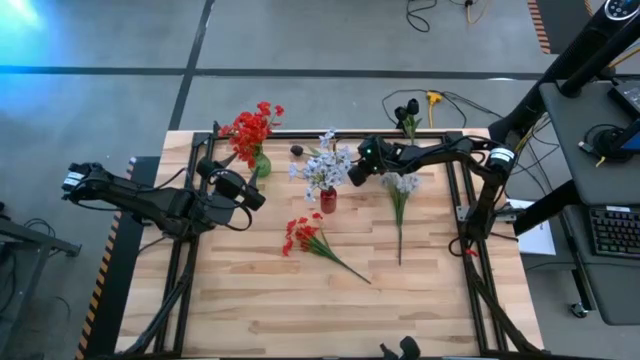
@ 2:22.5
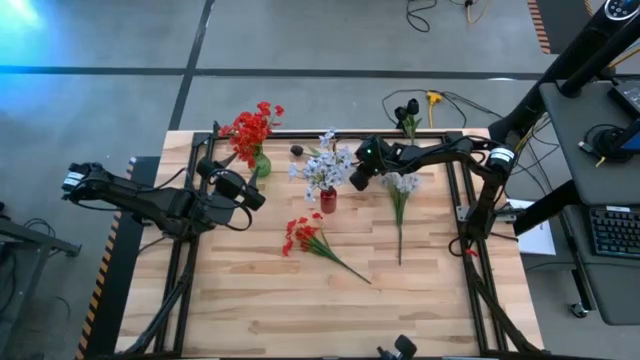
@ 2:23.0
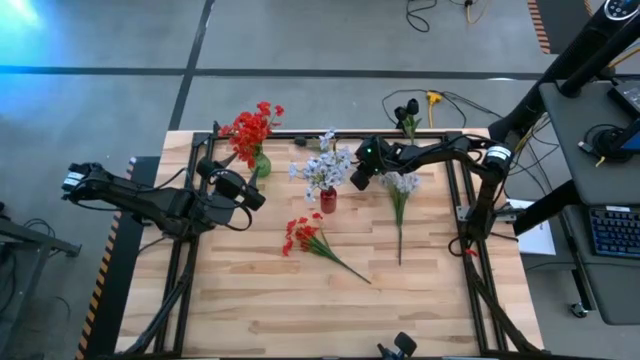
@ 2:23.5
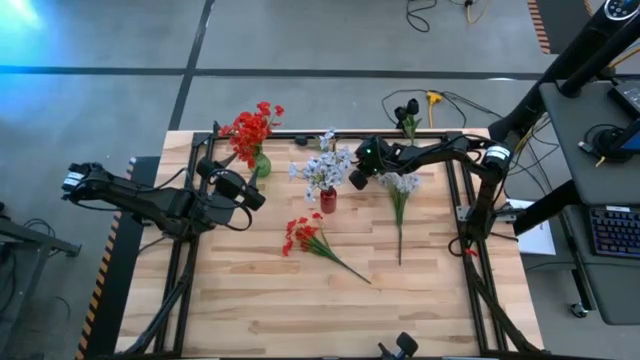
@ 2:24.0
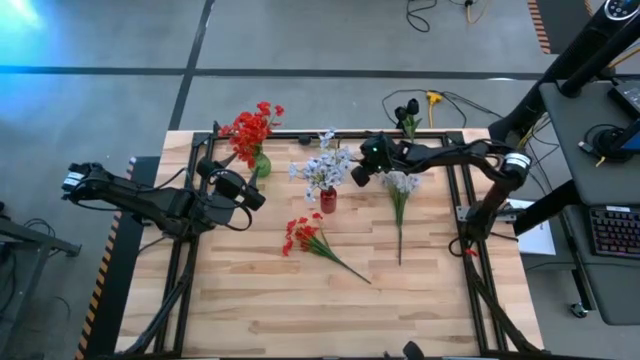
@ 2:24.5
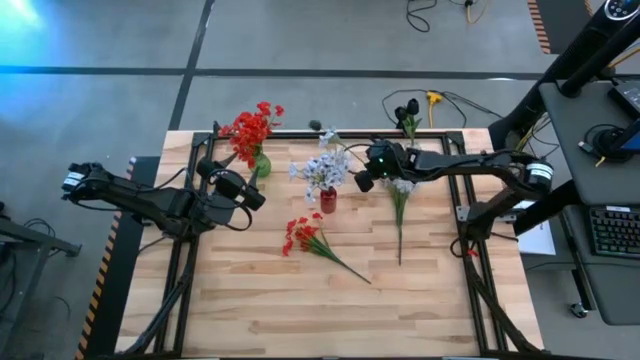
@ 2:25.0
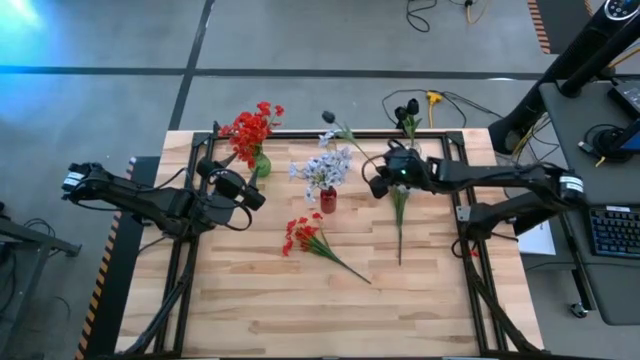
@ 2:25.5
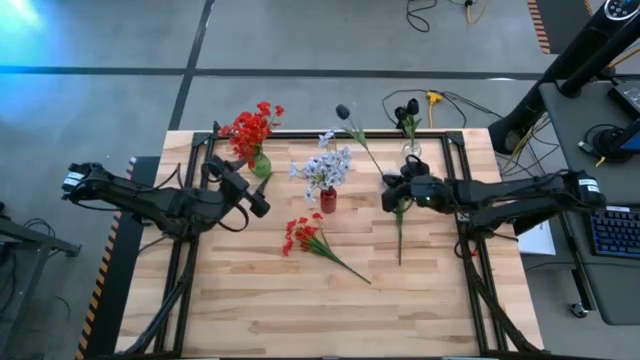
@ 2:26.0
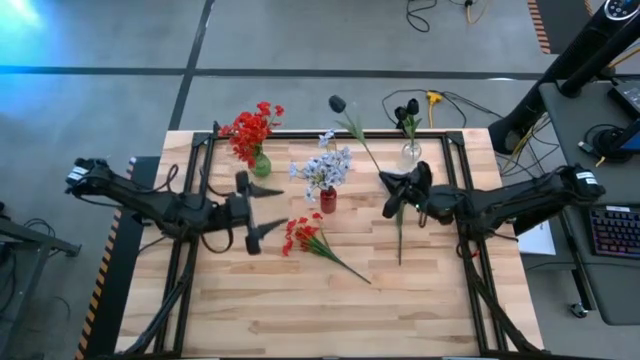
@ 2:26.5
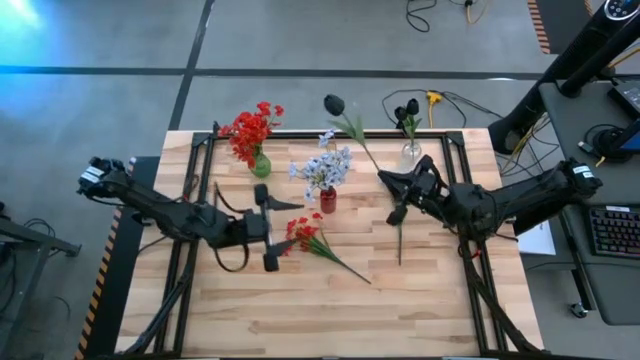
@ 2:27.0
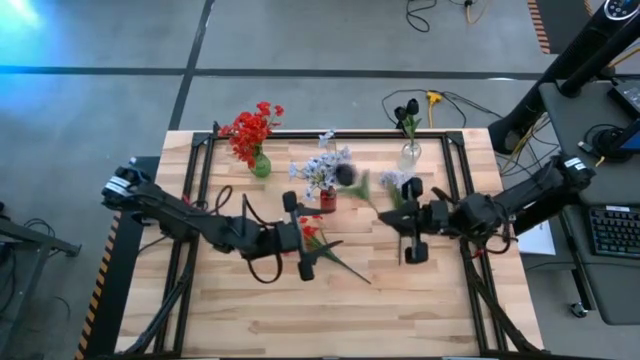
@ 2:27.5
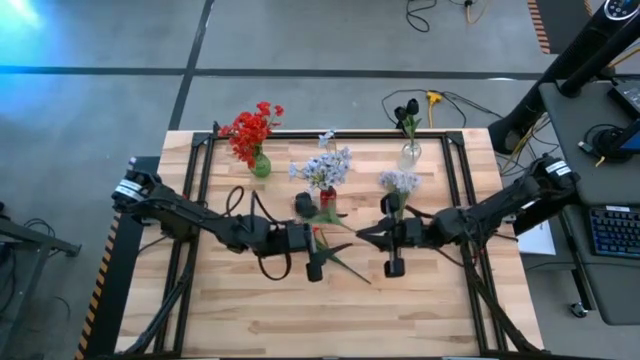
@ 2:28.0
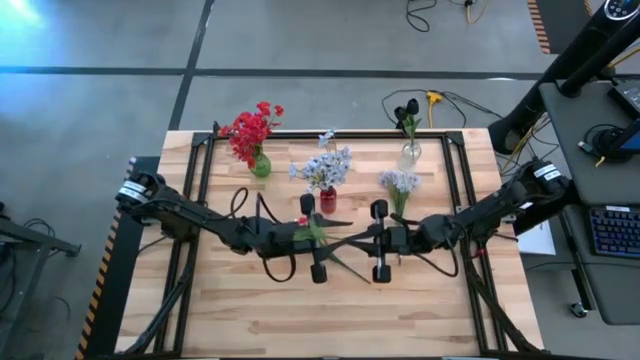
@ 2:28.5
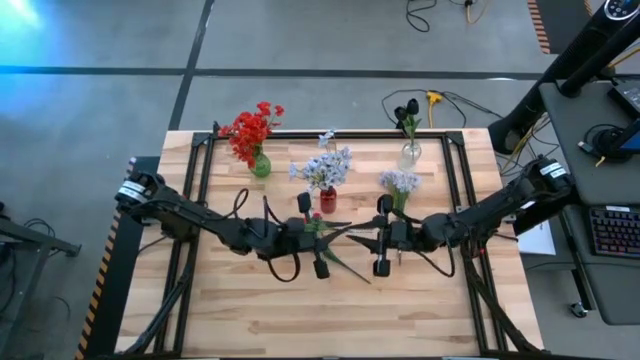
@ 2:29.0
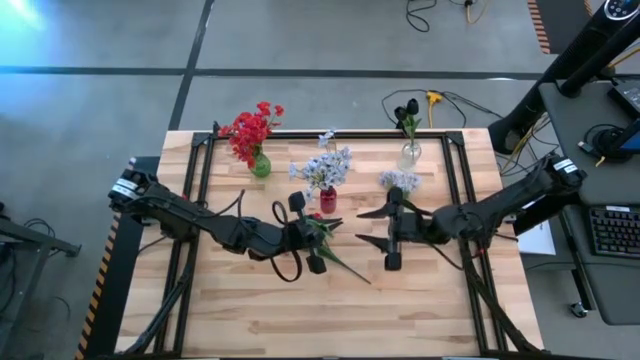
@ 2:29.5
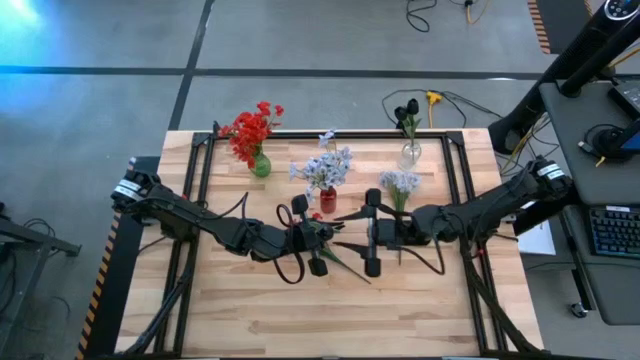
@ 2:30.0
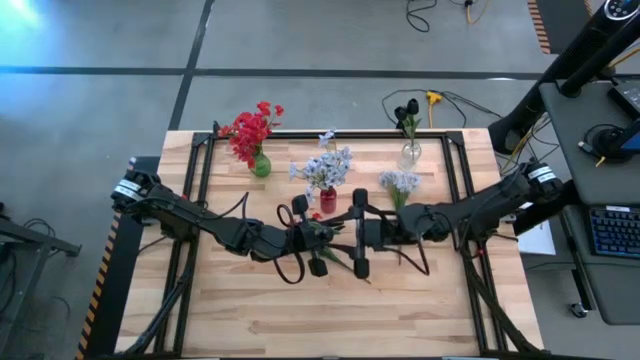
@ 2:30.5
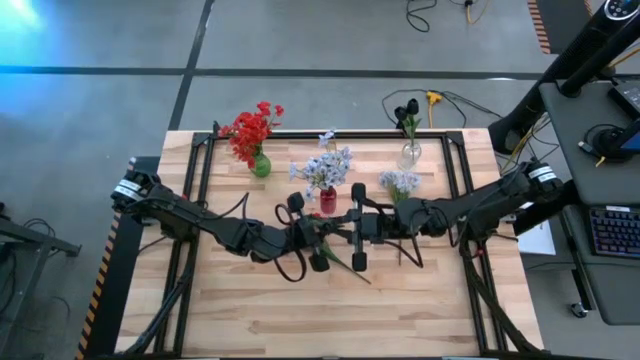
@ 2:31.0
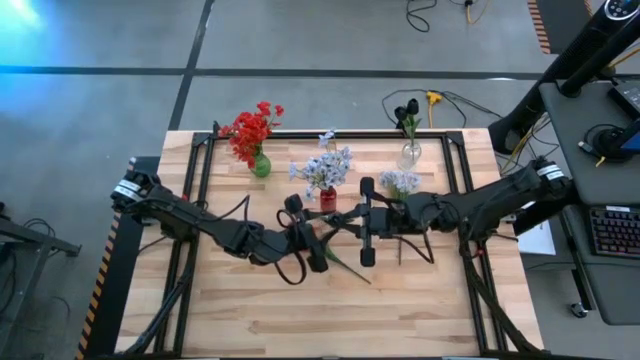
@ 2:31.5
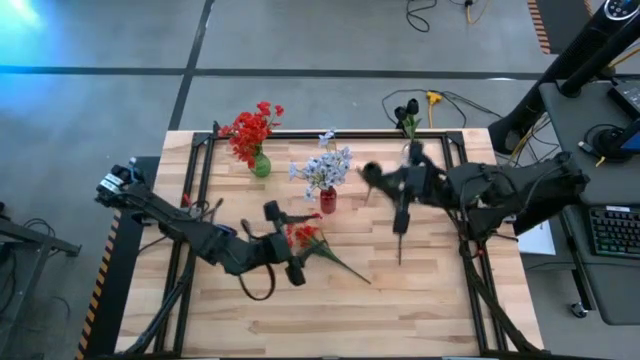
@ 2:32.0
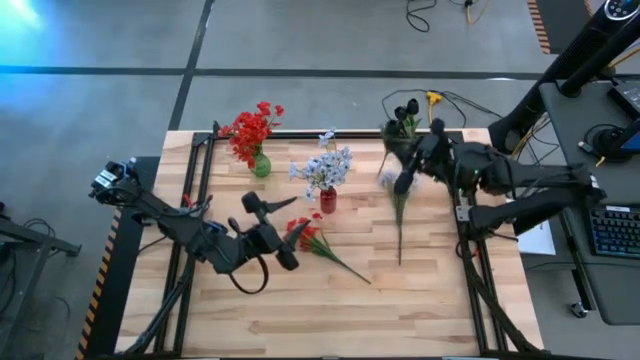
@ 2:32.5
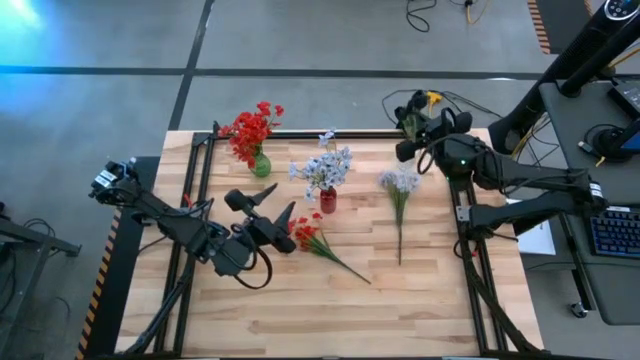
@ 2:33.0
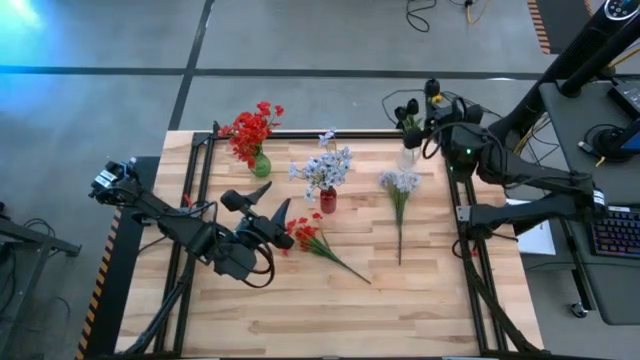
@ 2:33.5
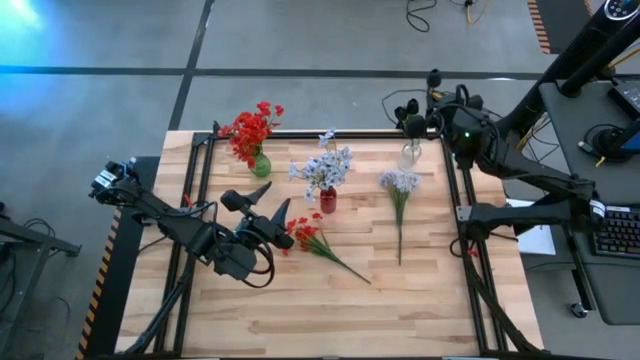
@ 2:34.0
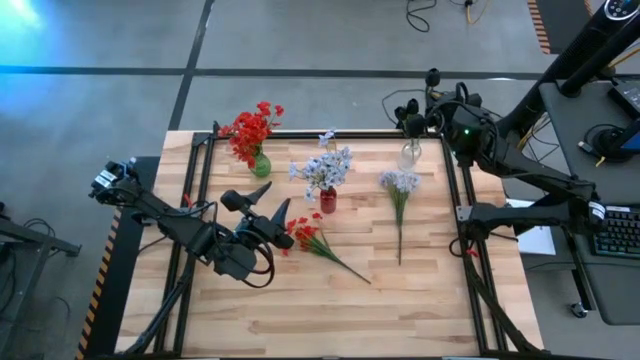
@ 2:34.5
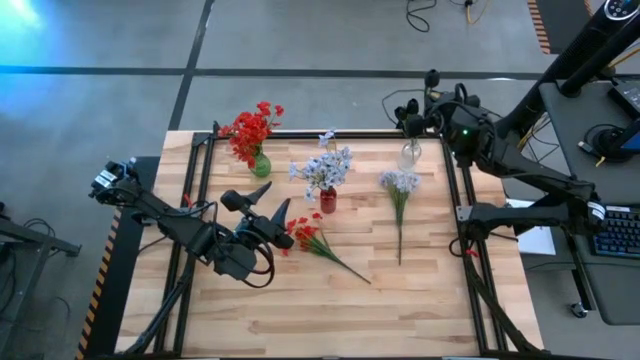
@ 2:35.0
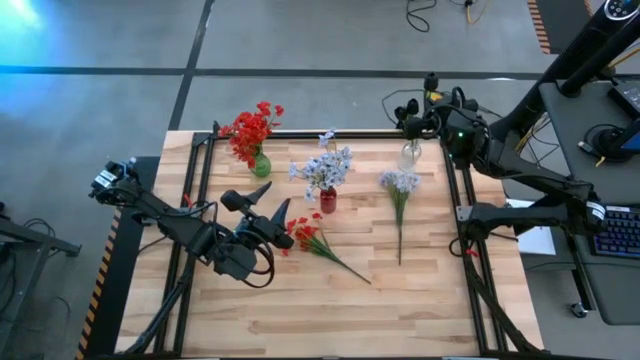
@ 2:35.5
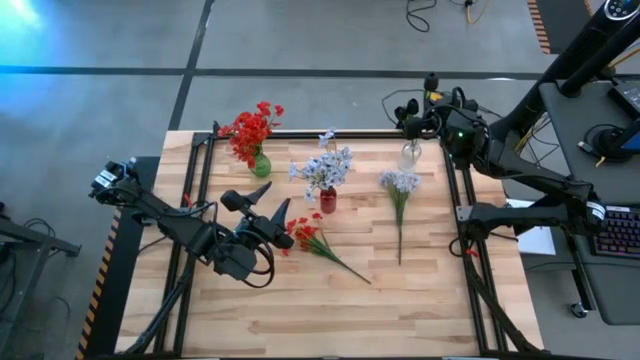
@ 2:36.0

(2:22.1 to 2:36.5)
Task: Sort flowers into vase by color
Put the black flower into the transparent vase

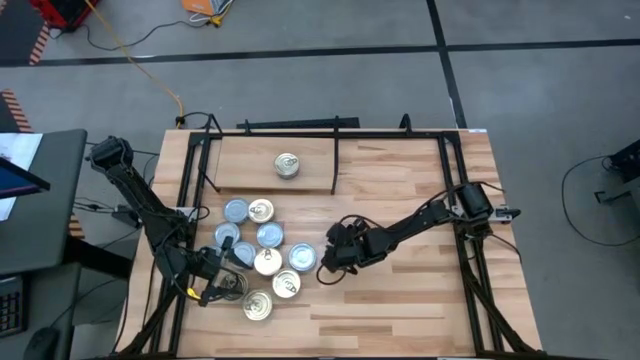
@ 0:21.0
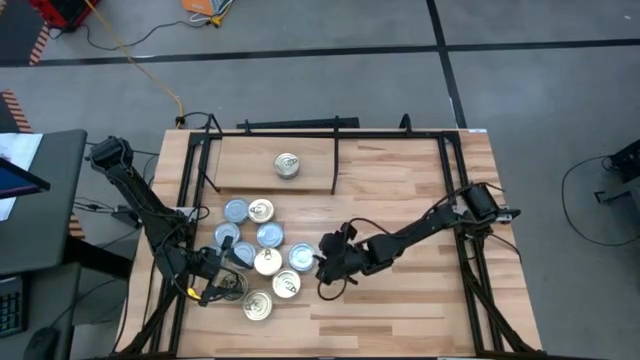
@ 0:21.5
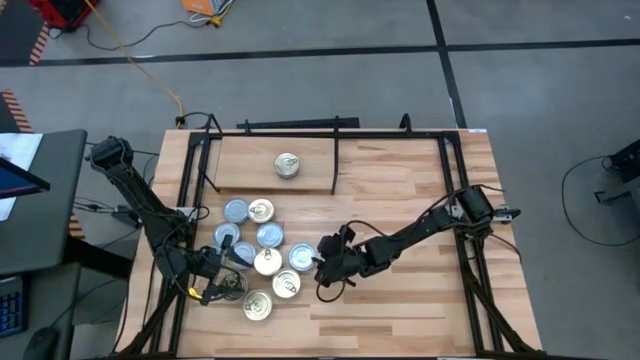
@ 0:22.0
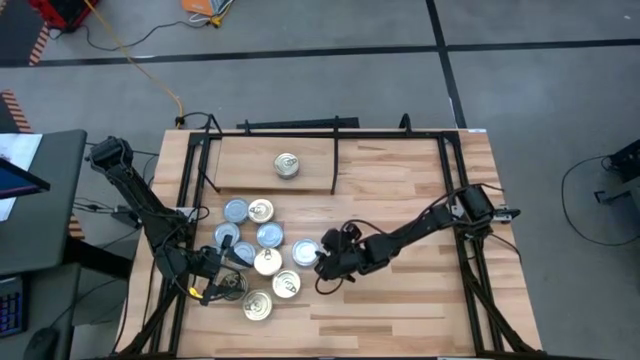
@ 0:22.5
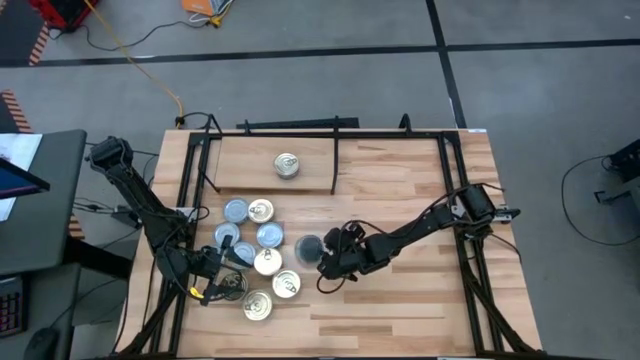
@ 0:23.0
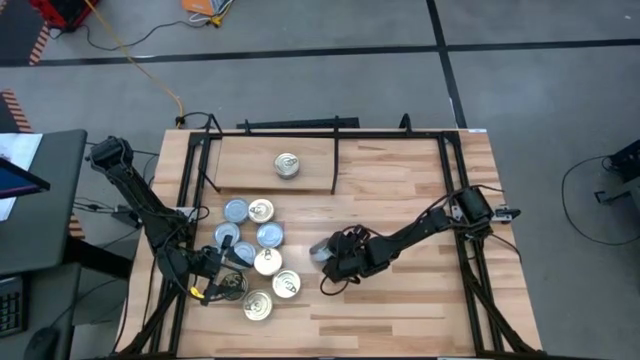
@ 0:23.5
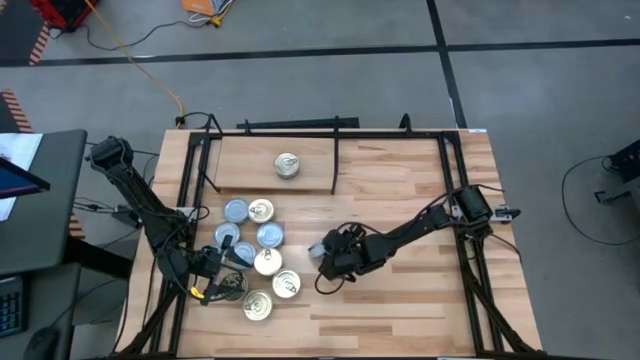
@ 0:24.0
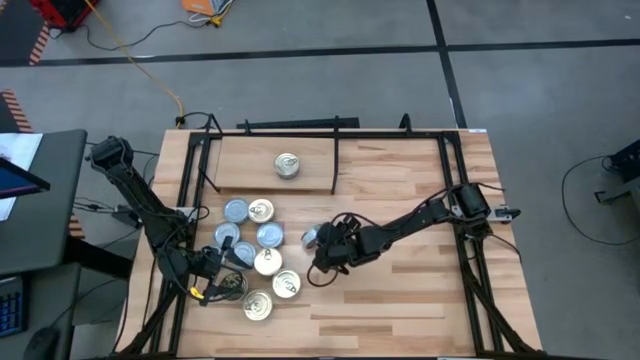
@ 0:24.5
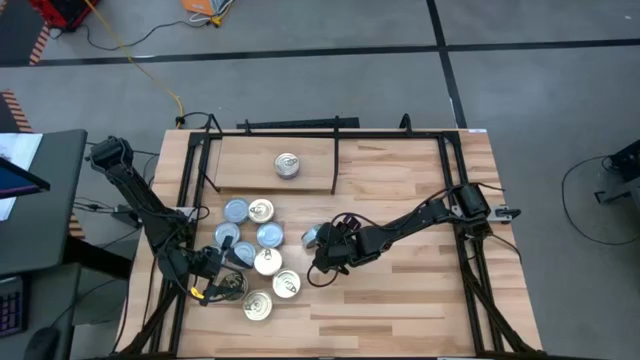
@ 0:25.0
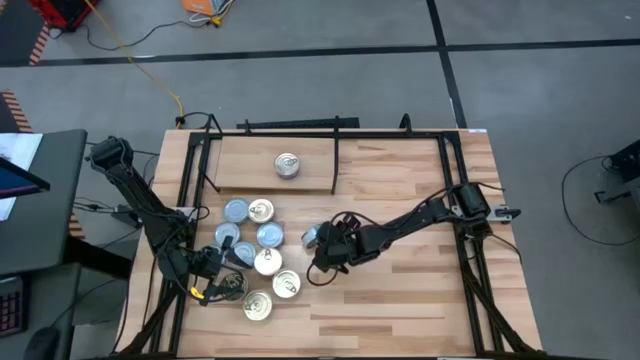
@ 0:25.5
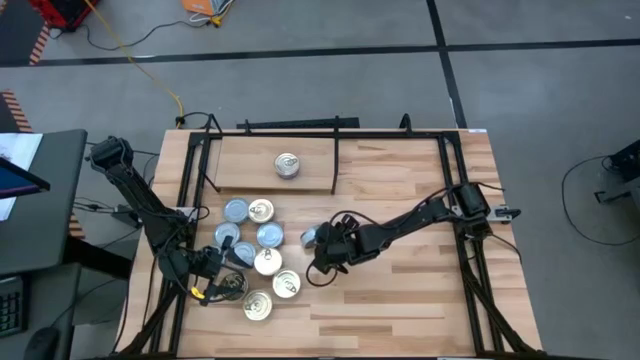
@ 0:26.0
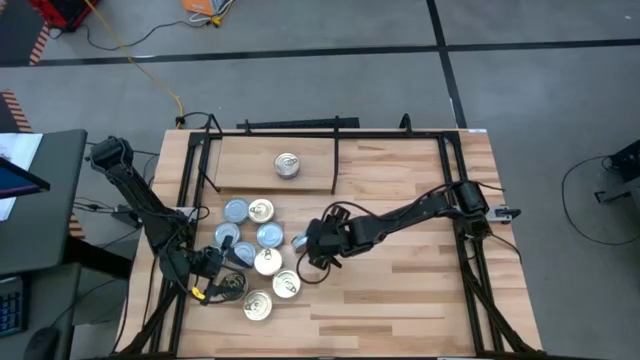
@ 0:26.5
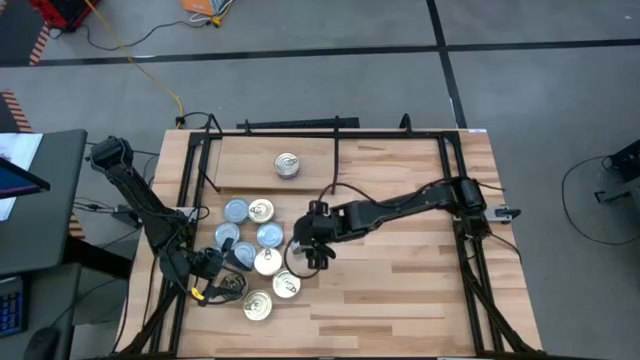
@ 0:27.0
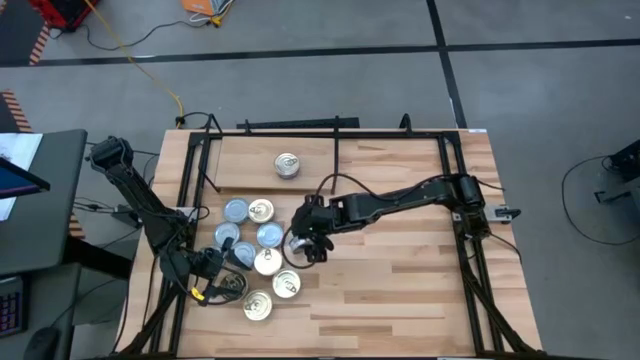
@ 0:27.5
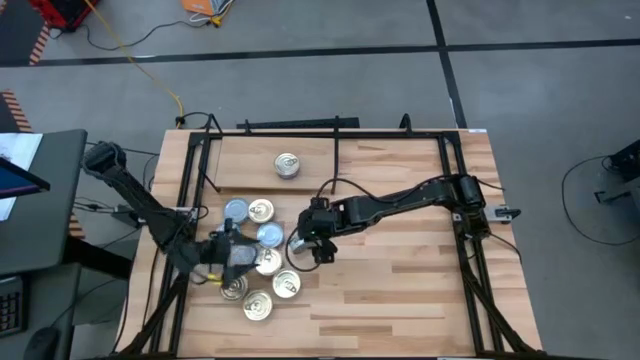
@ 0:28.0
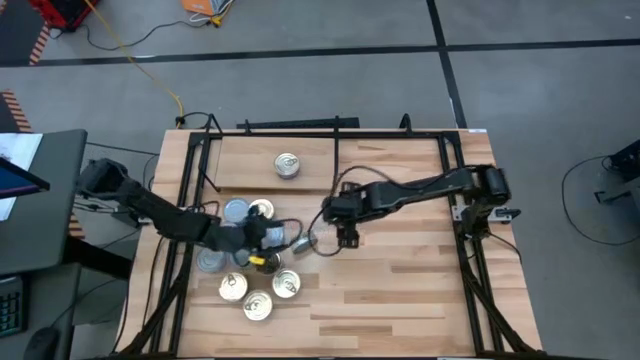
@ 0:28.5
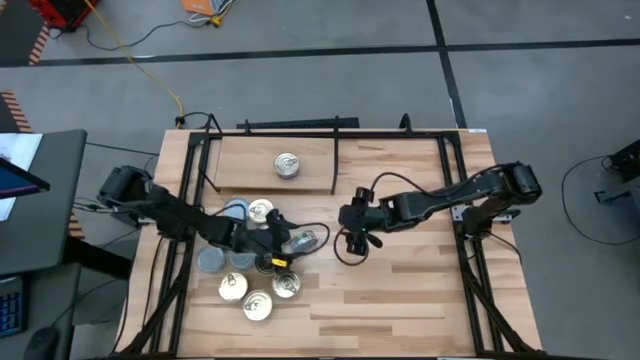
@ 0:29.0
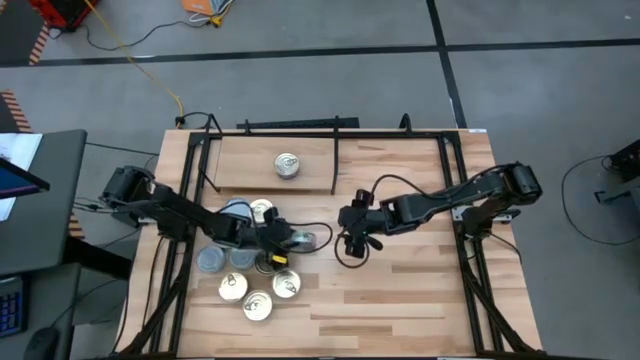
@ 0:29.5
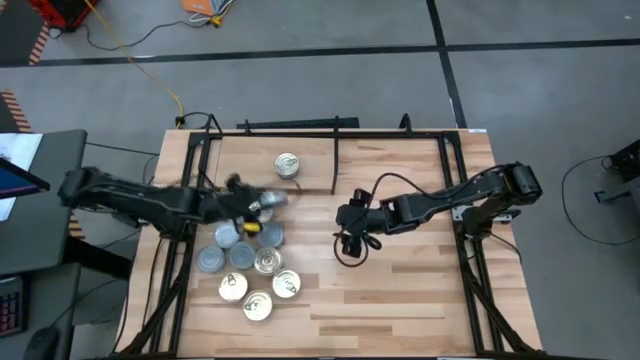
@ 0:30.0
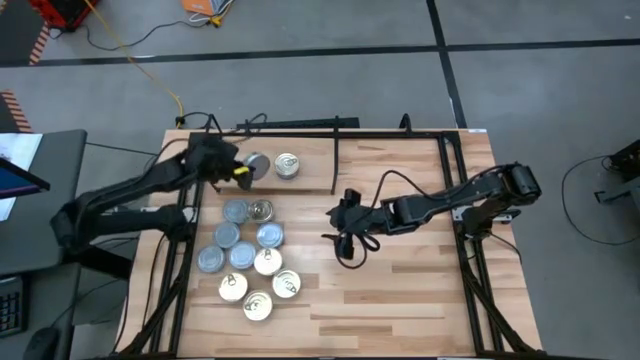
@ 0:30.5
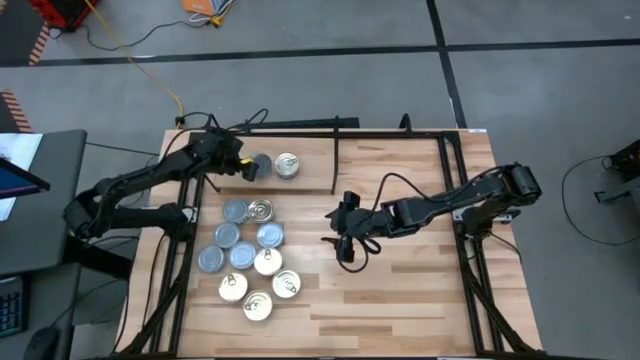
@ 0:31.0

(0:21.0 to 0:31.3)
Task: Stack canned seafood by type on shelf
Put the green tuna can on the shelf
